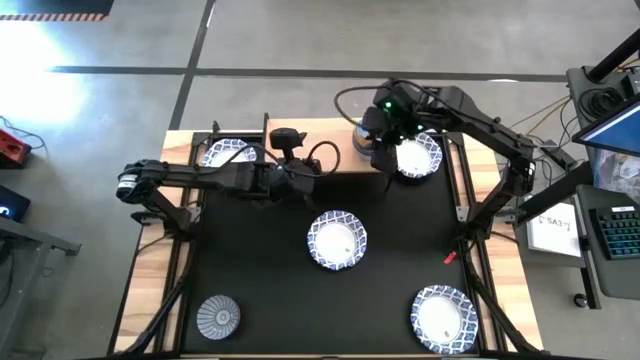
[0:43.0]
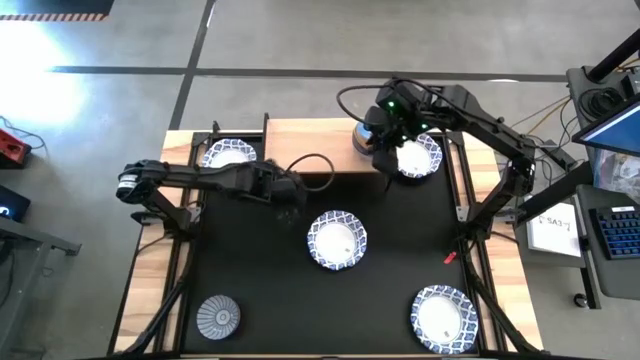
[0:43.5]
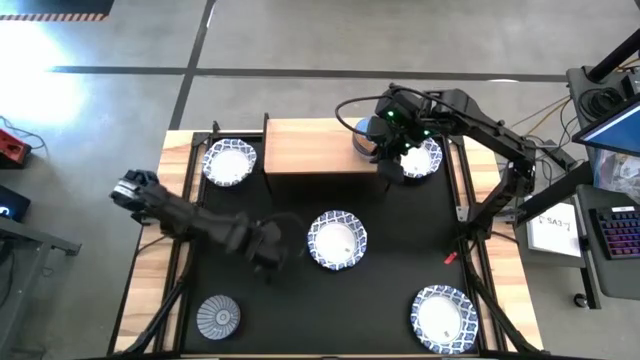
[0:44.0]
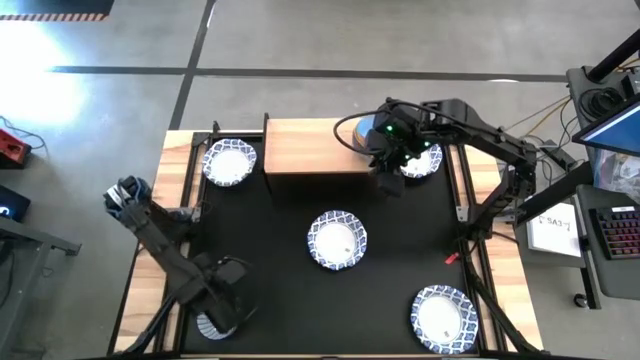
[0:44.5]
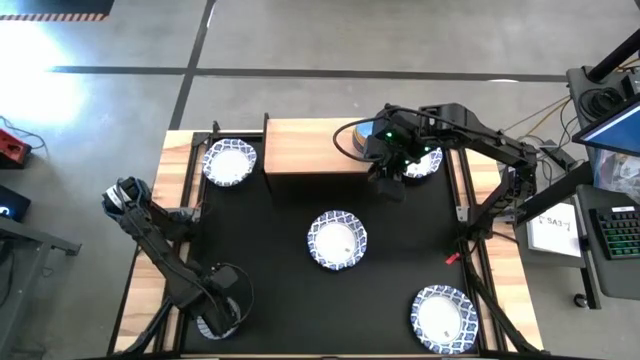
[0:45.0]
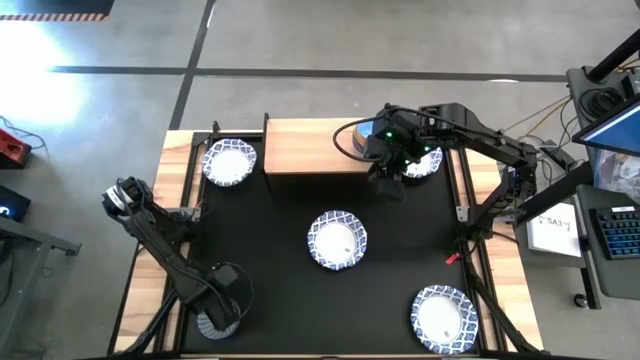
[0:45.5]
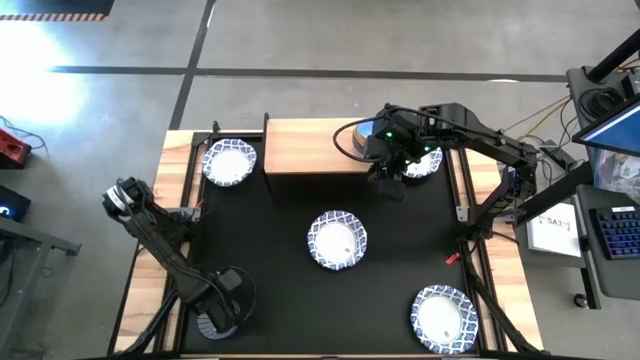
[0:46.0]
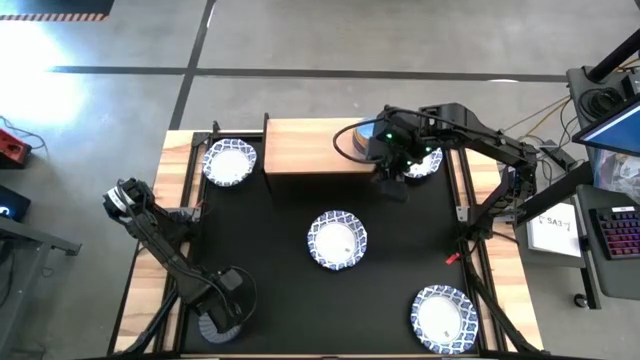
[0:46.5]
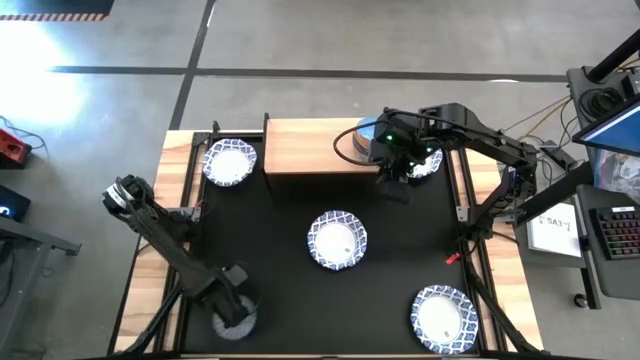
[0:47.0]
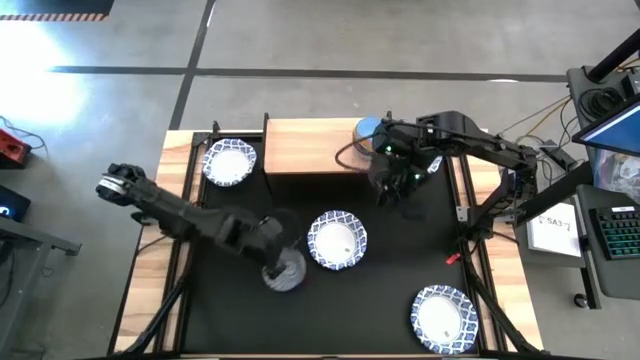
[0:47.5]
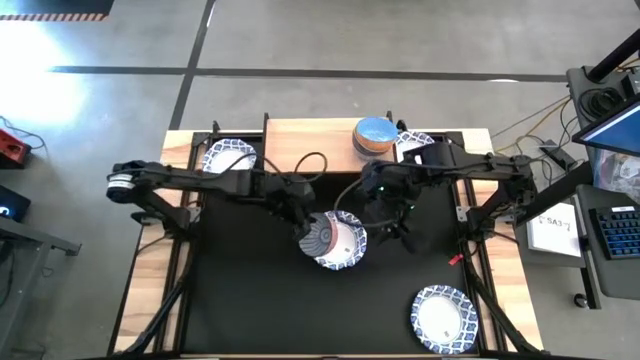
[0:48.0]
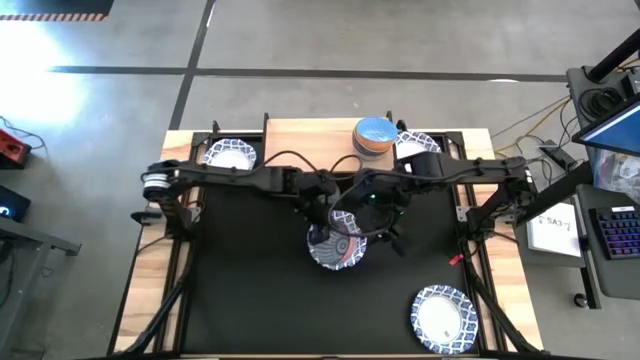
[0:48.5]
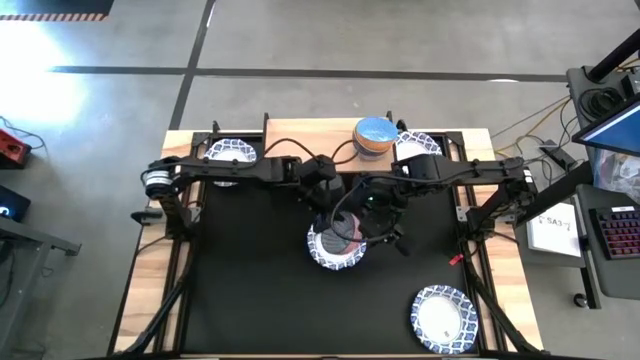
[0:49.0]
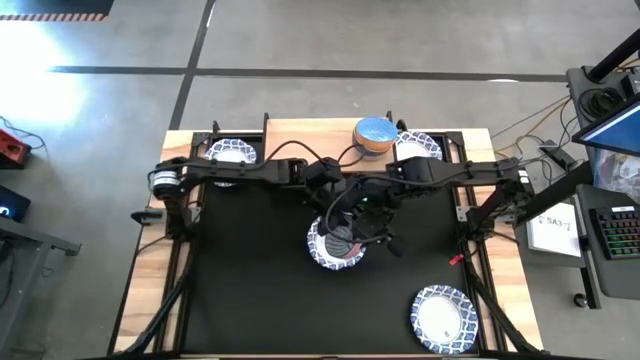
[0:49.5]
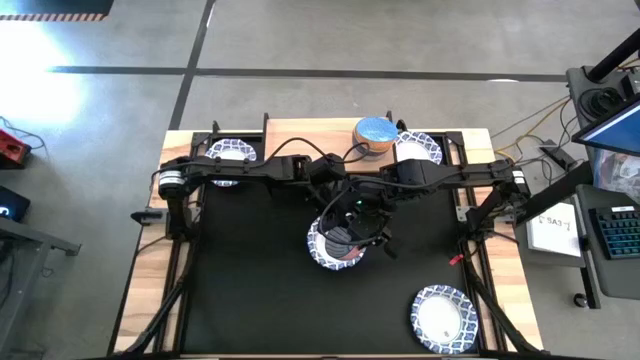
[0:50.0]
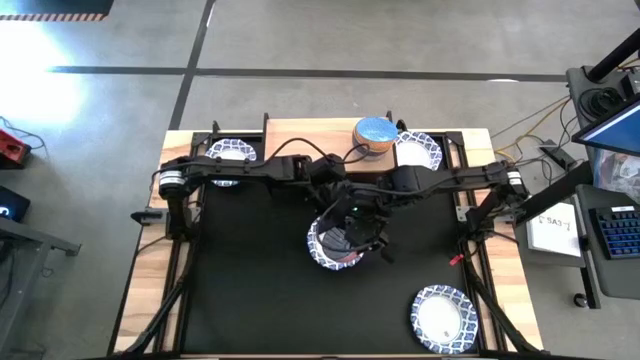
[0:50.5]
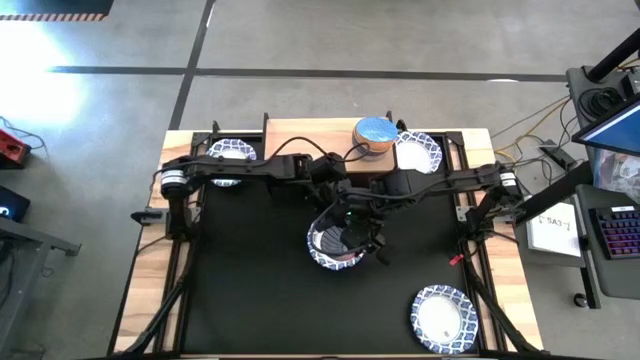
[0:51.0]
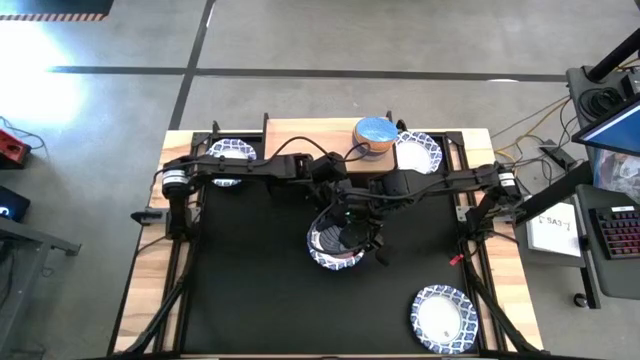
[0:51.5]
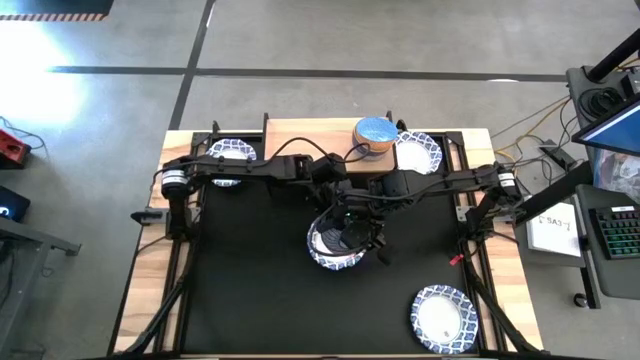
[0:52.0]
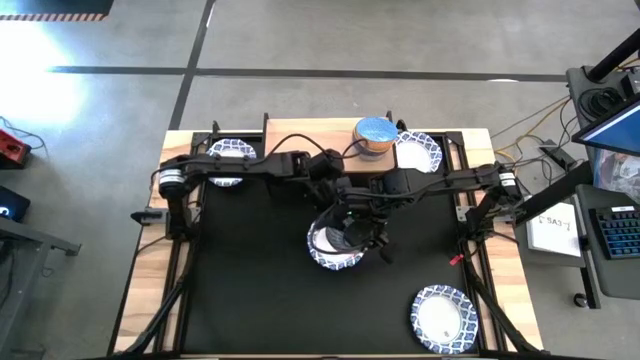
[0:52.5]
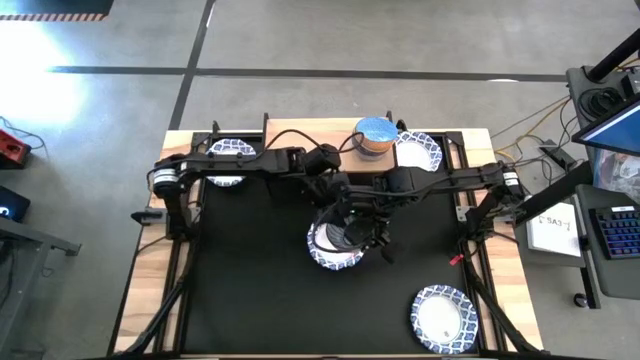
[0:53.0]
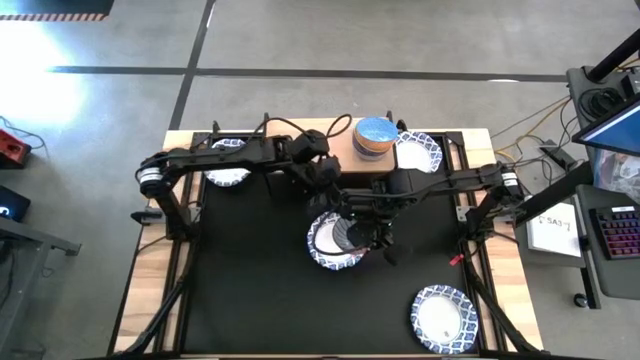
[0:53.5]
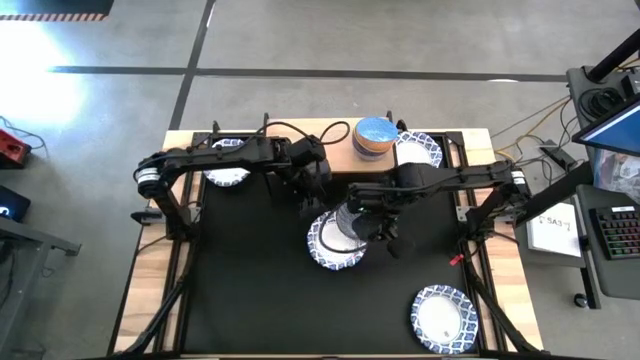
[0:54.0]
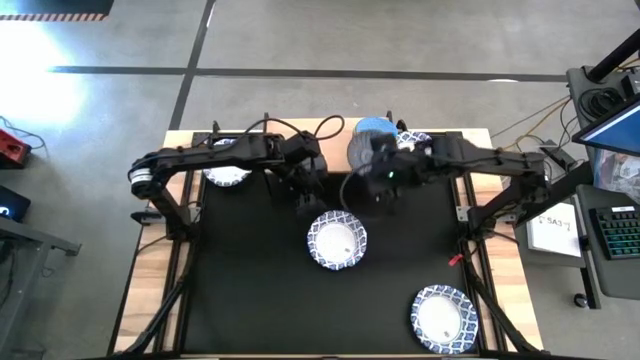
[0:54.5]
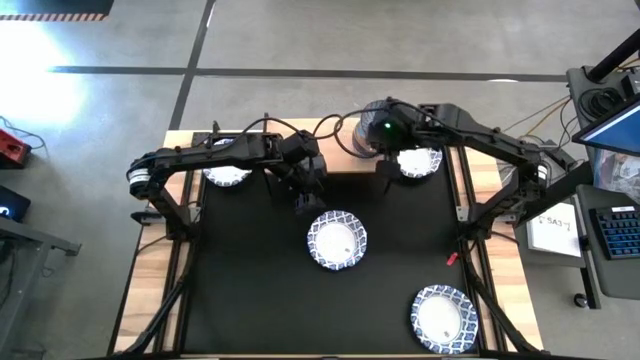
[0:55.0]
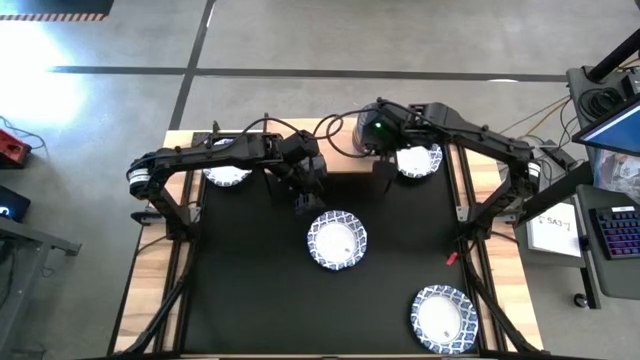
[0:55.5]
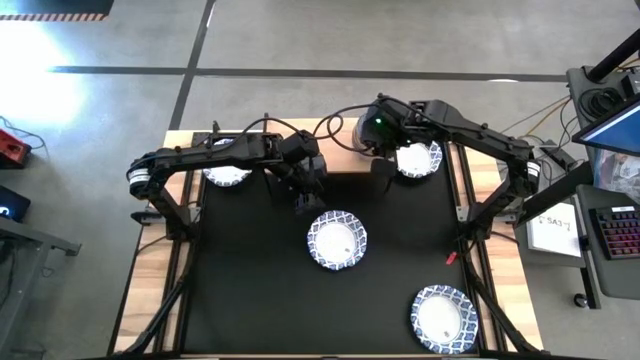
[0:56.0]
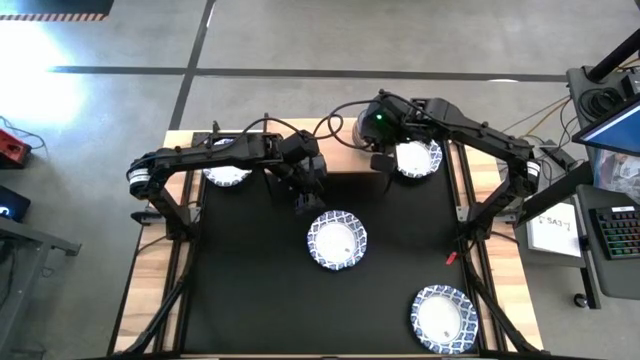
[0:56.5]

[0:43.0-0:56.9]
Task: Place and stack bowls onto a shelf
Stack the dark blue bowl on top of the light blue bowl on the shelf

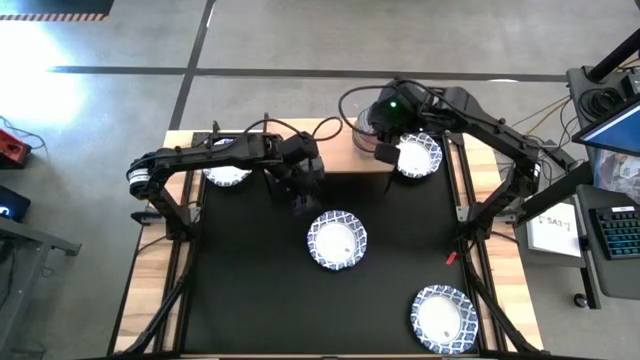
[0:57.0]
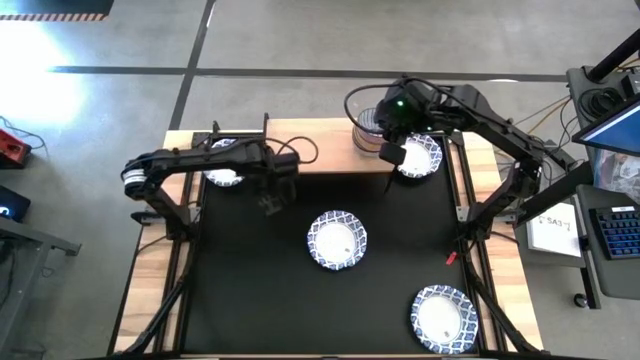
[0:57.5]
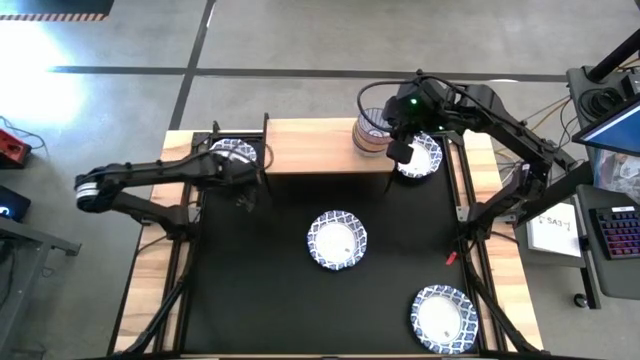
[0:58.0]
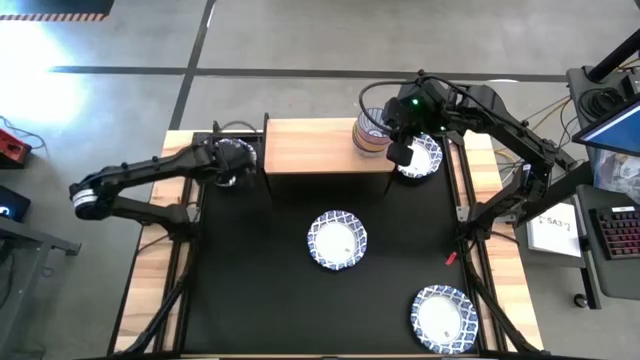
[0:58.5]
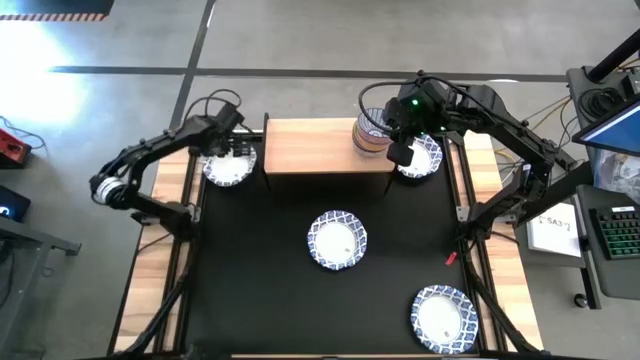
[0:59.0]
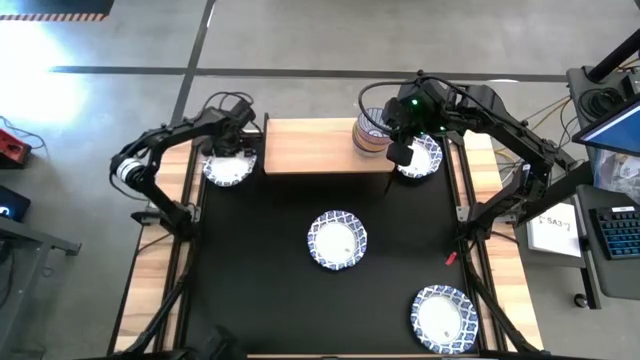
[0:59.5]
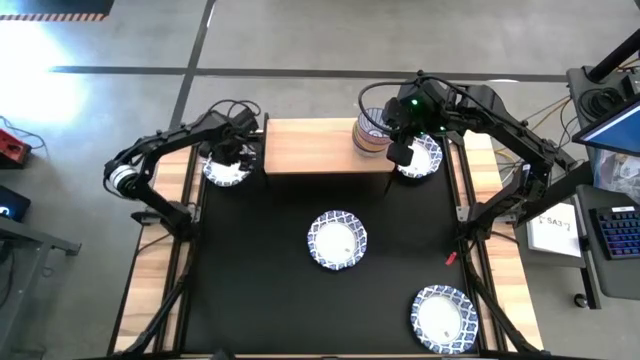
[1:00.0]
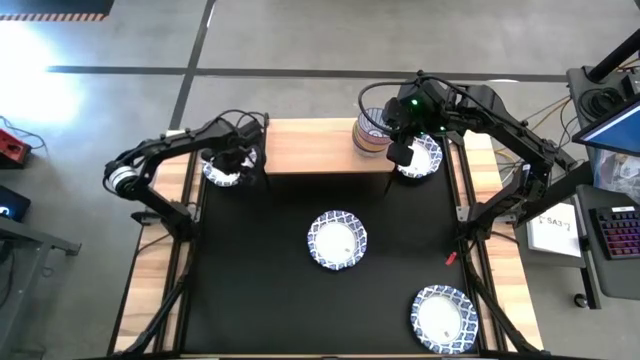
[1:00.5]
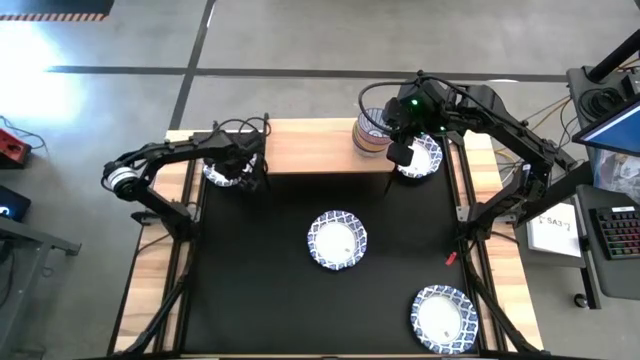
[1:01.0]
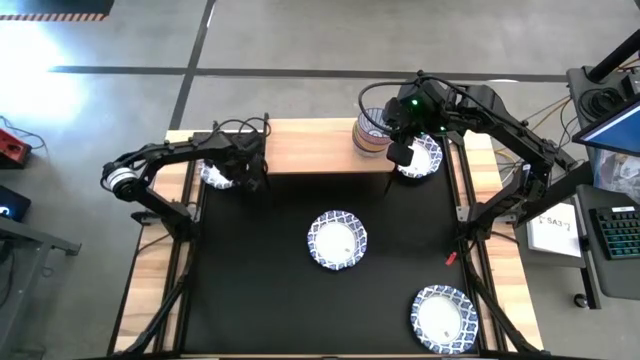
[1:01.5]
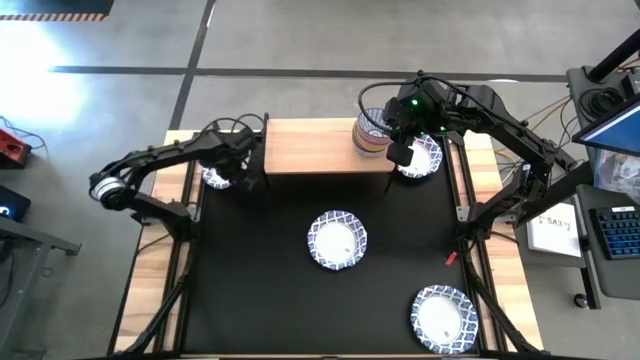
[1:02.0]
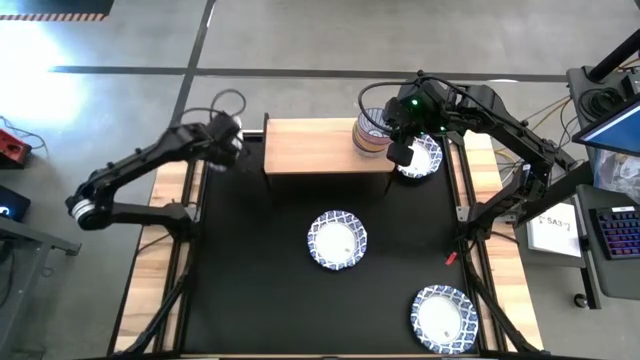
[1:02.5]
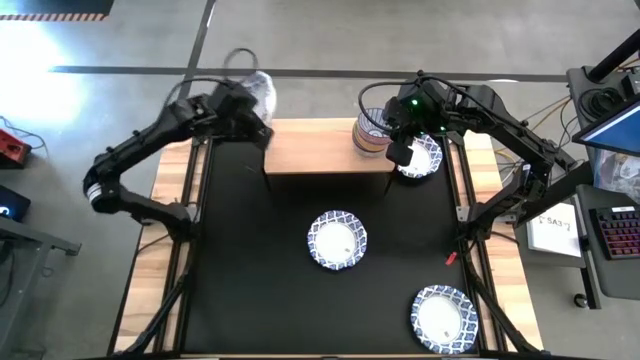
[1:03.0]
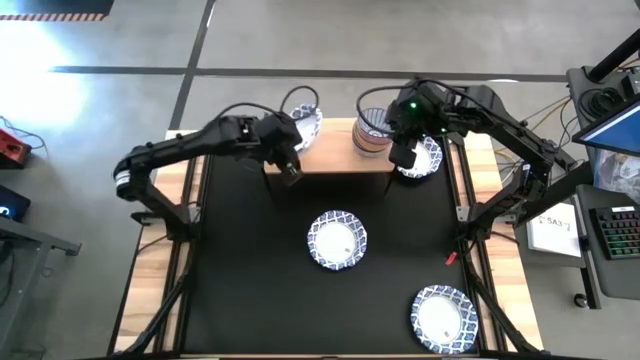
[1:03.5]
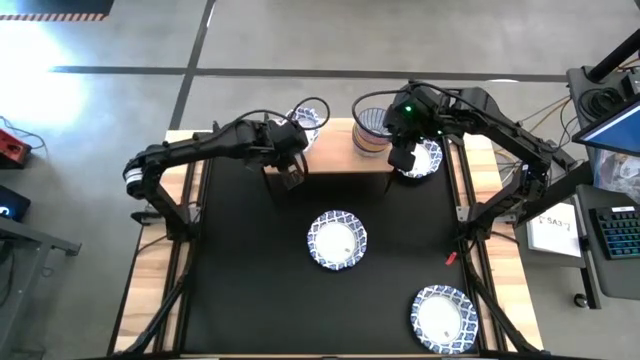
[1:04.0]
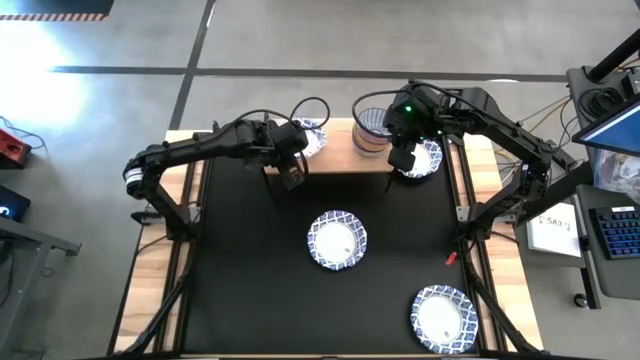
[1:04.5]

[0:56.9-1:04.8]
Put the white and blue bowl on the shelf

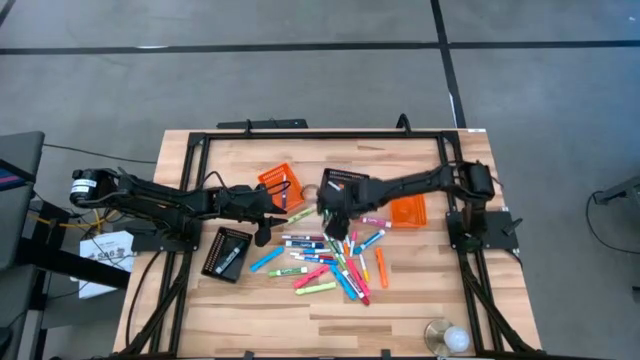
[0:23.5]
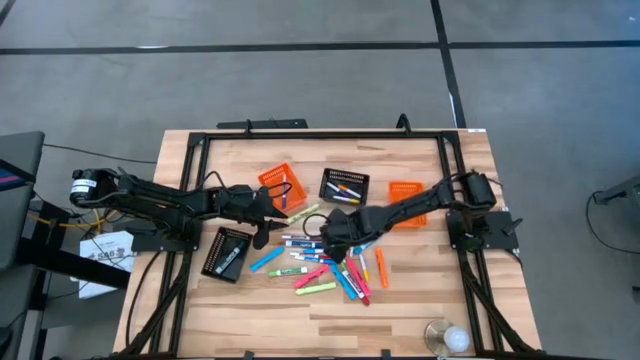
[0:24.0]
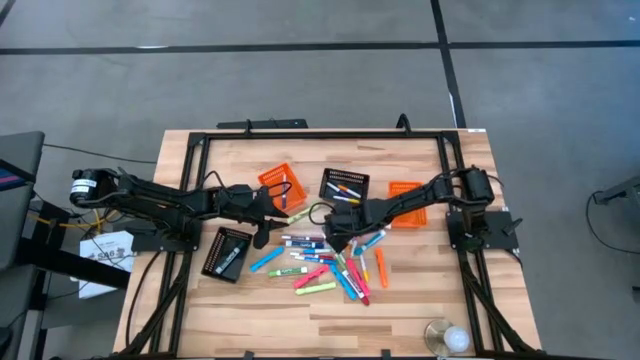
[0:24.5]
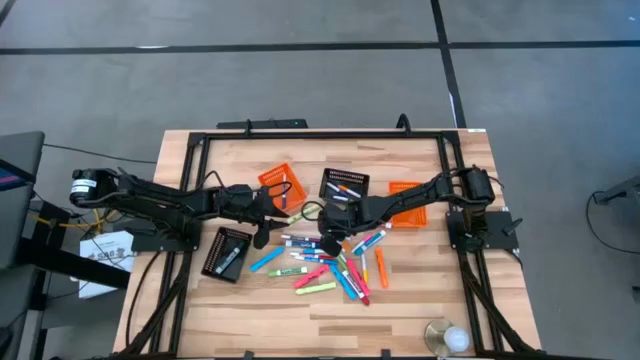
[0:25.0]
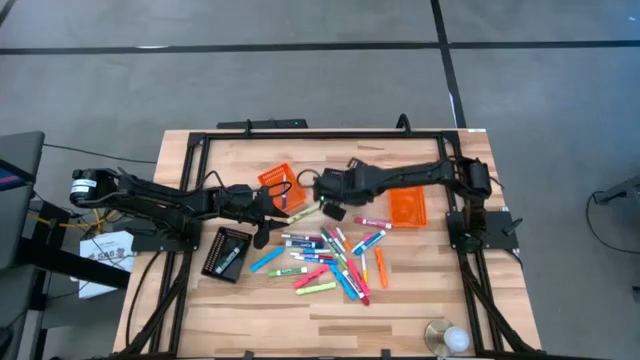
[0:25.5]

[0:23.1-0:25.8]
Task: Pick & Place Markers
Put the black highlighter into the right black bin
